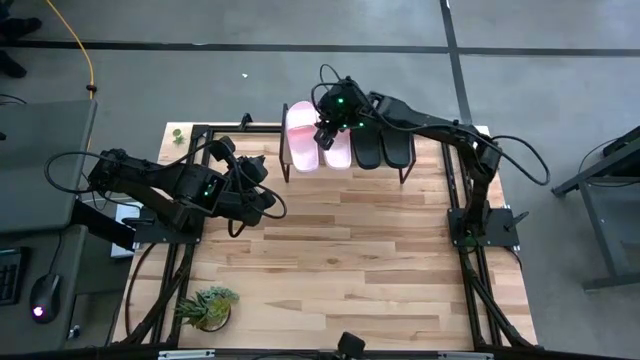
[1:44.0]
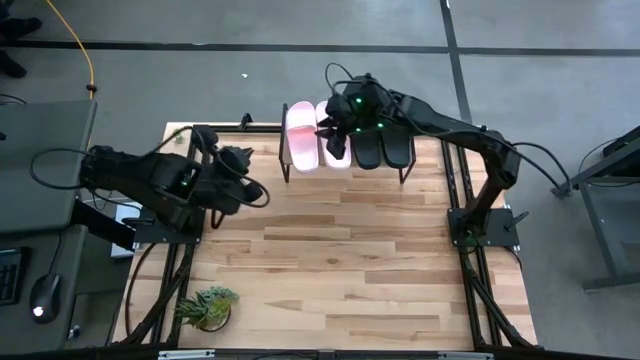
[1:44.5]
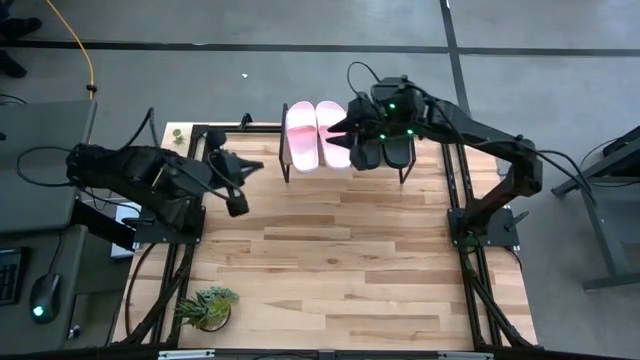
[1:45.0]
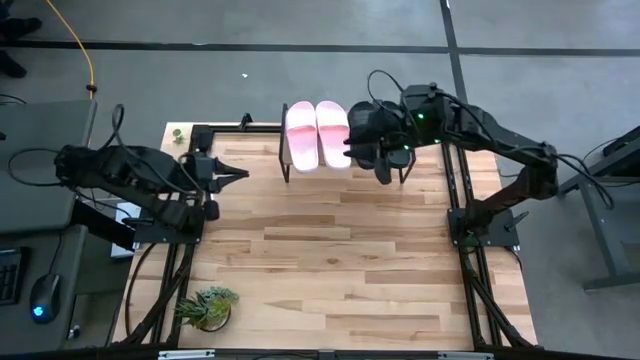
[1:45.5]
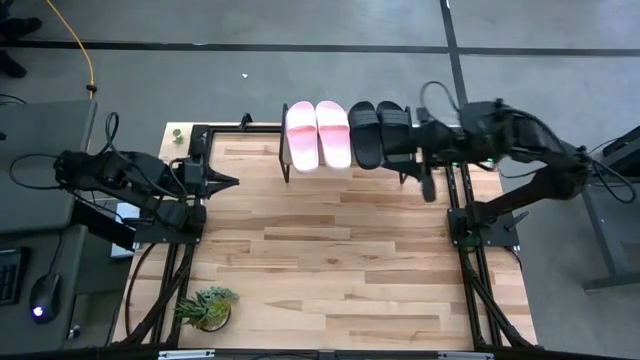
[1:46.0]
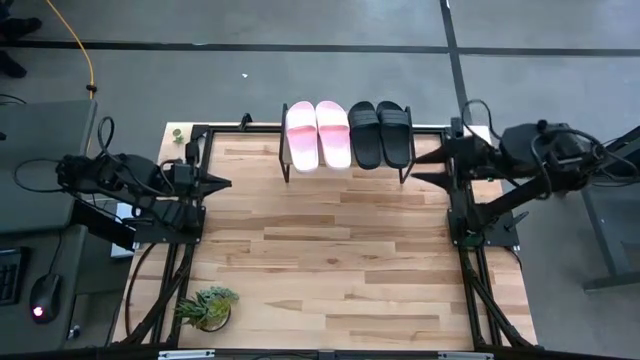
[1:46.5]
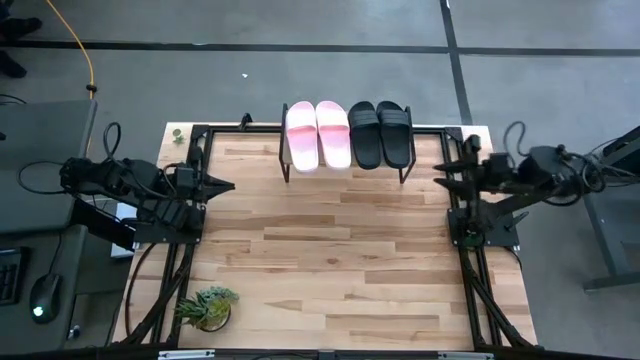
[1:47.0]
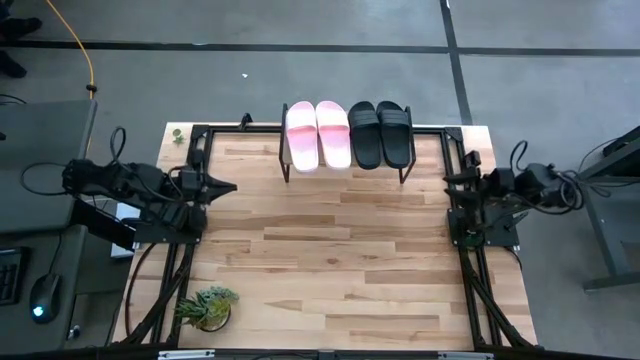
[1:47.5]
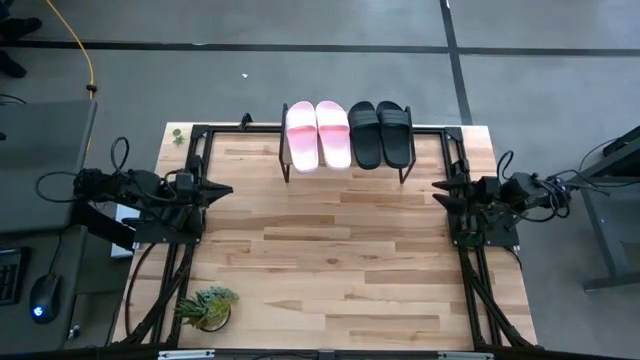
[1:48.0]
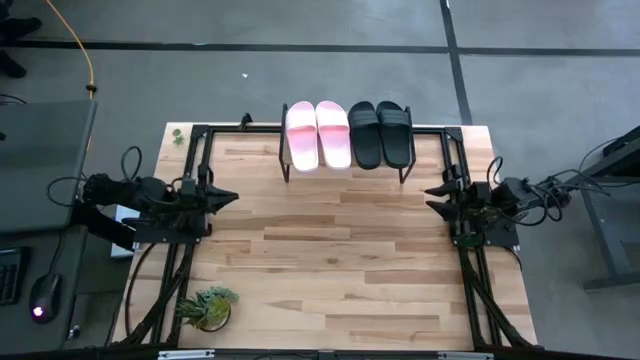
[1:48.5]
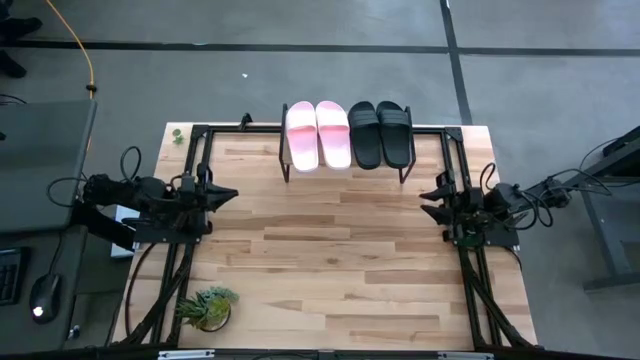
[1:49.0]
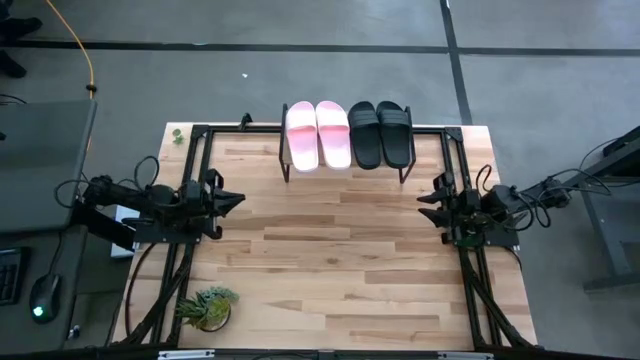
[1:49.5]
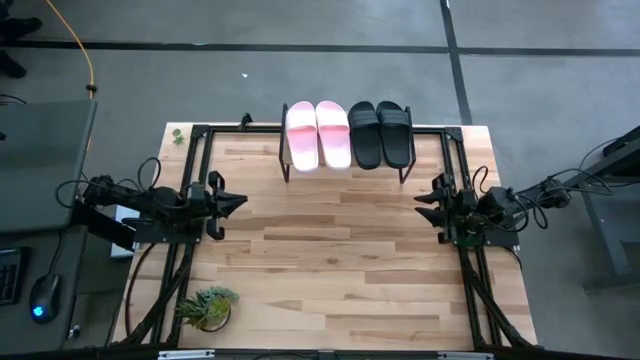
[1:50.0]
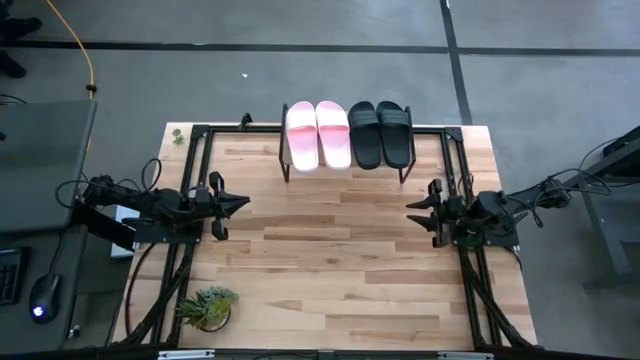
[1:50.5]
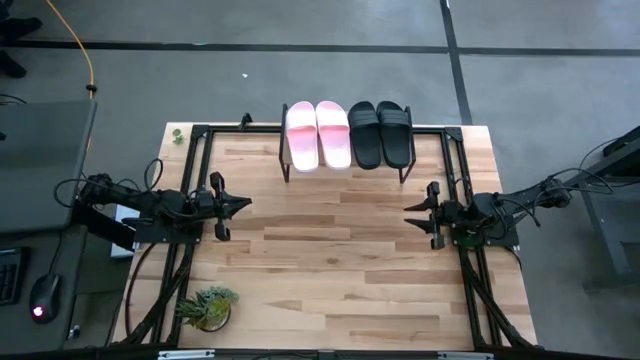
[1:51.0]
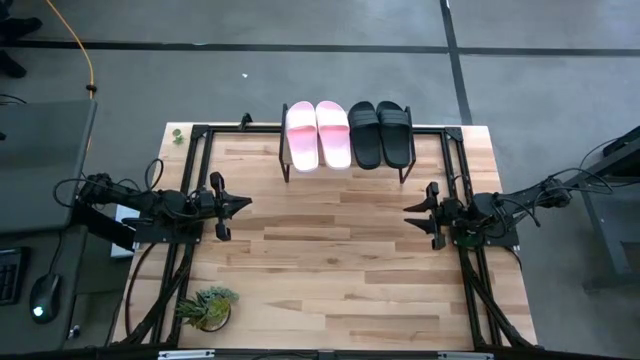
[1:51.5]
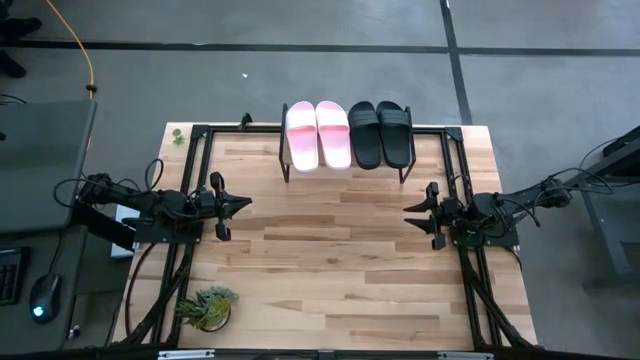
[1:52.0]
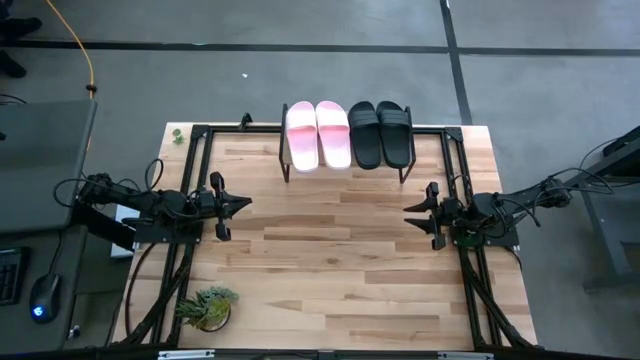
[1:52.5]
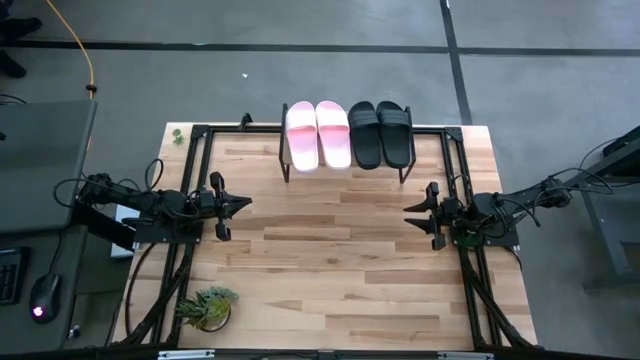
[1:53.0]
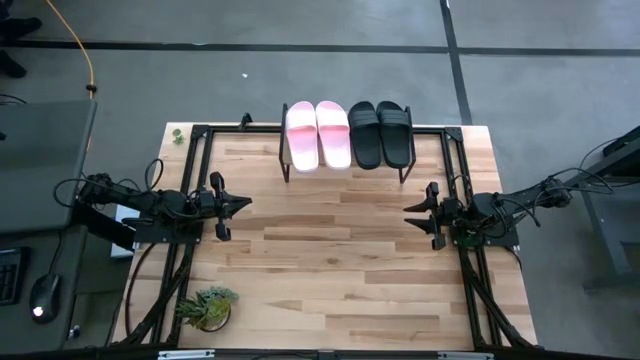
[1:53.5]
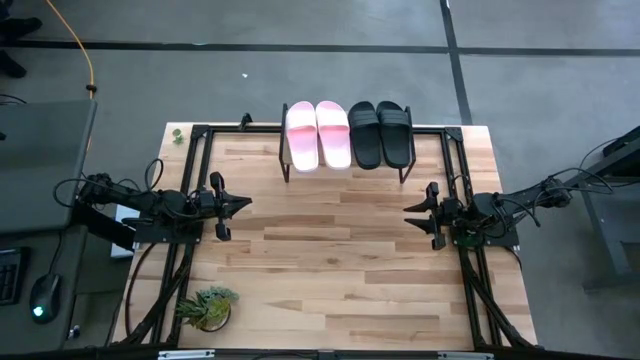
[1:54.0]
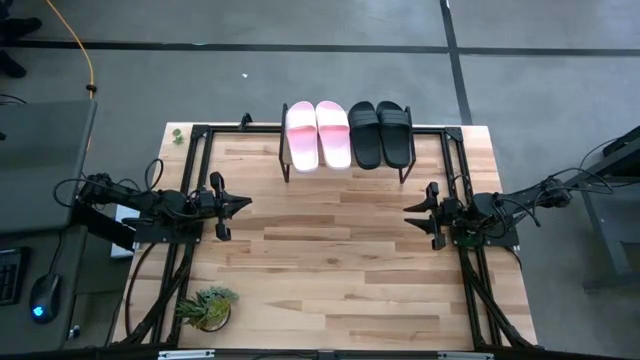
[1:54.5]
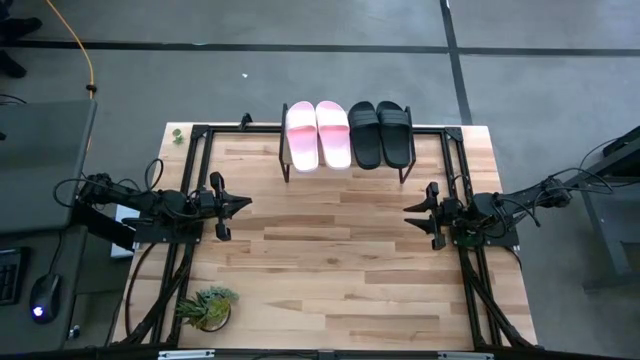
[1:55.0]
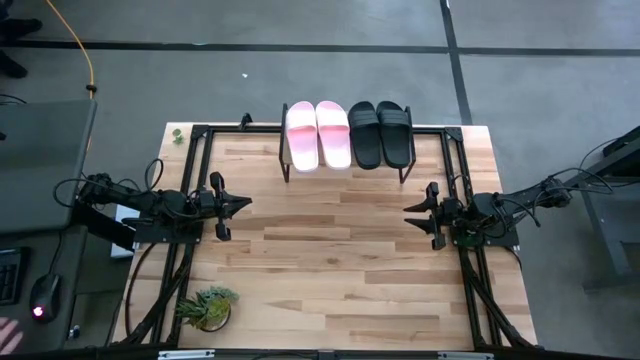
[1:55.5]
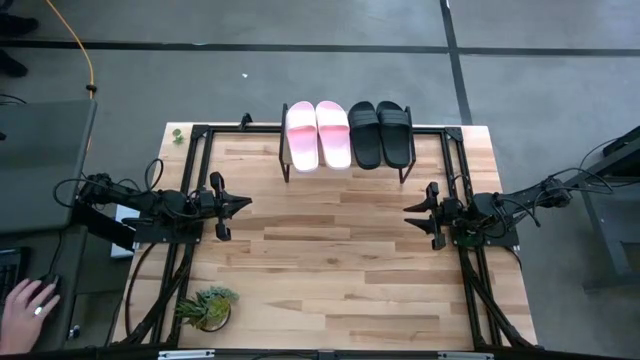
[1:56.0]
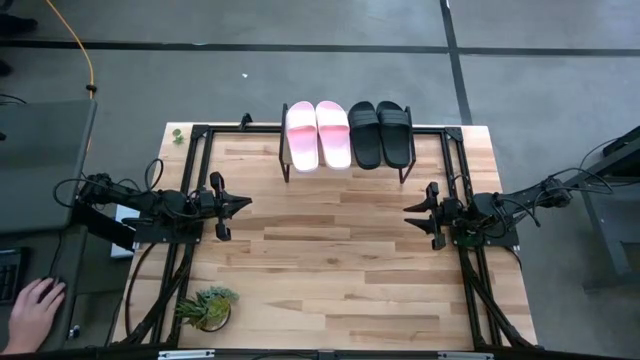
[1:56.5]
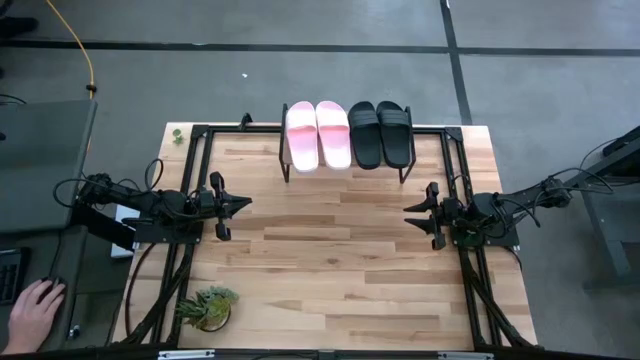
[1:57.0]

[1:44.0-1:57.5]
Task: Pick and place slides into the shelf
Return to Home Position

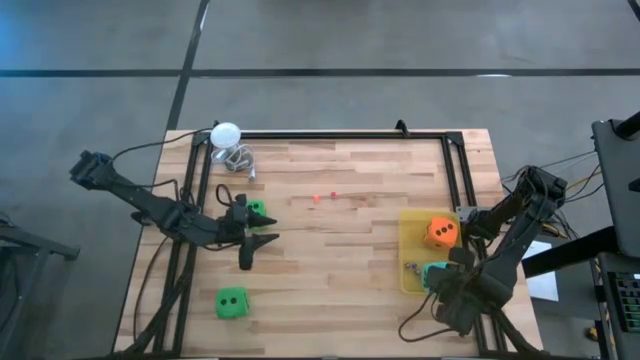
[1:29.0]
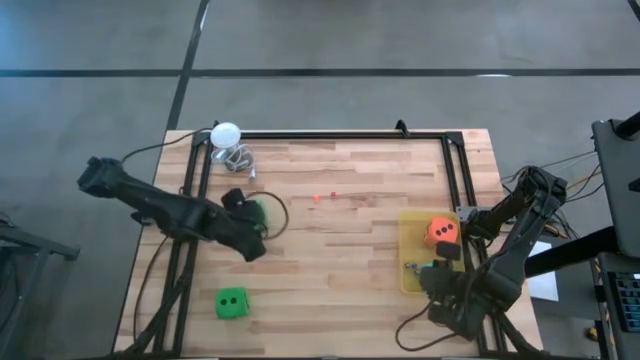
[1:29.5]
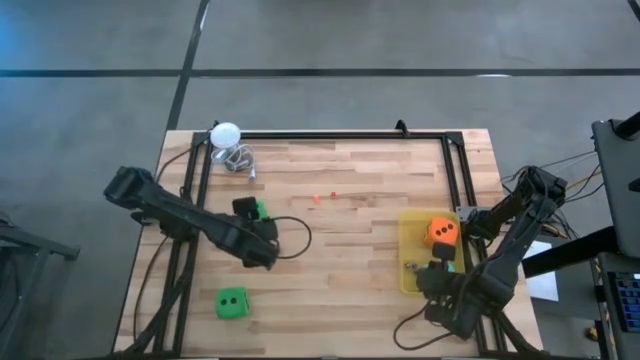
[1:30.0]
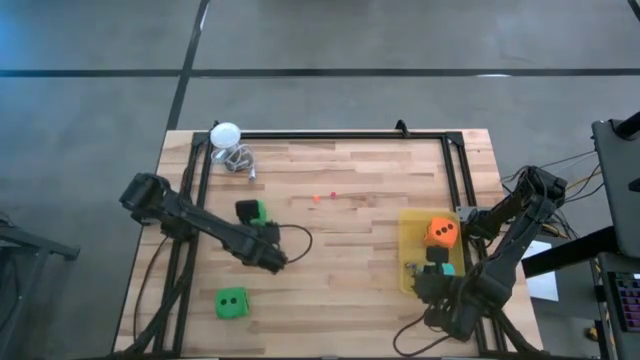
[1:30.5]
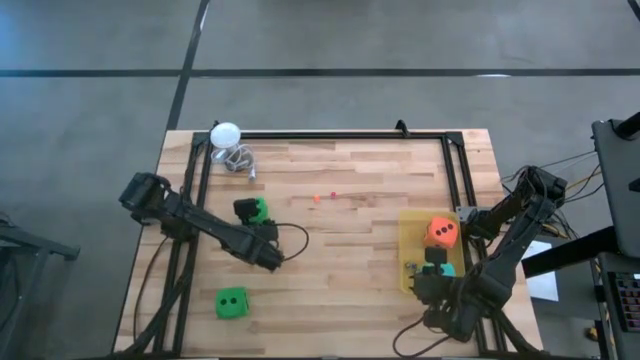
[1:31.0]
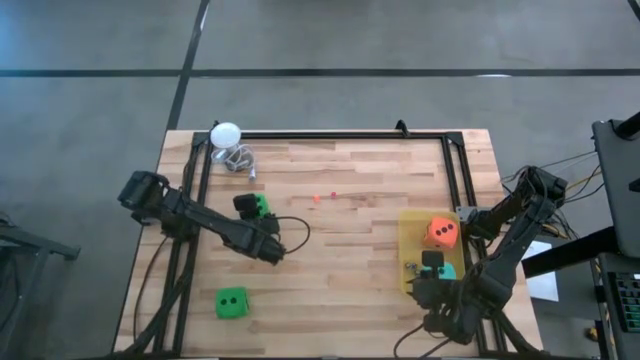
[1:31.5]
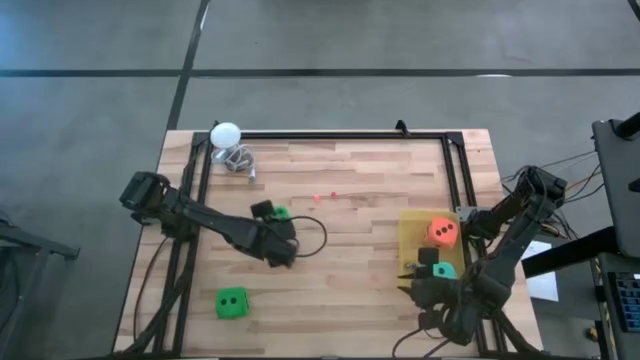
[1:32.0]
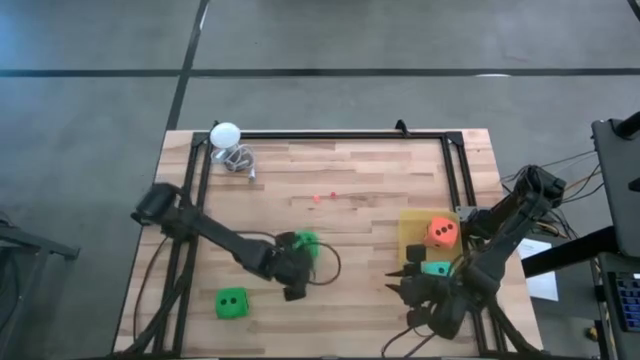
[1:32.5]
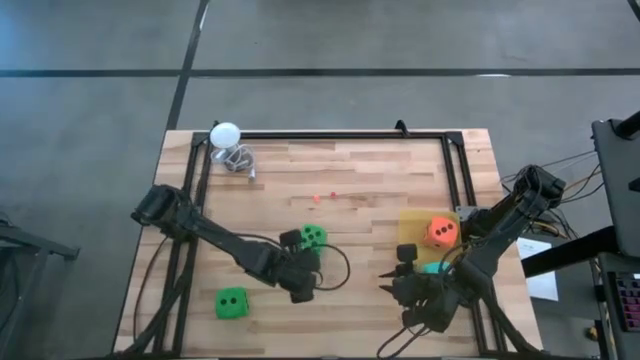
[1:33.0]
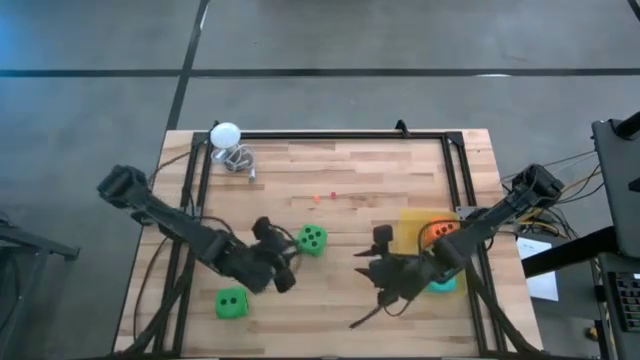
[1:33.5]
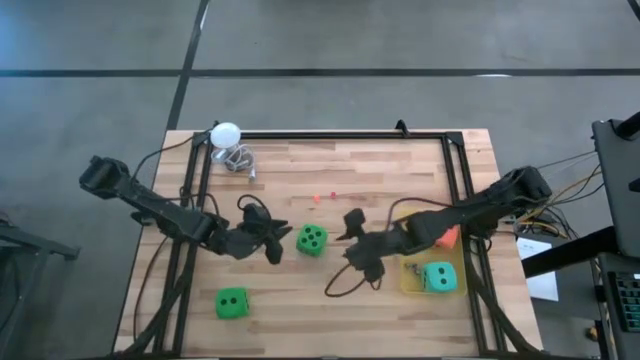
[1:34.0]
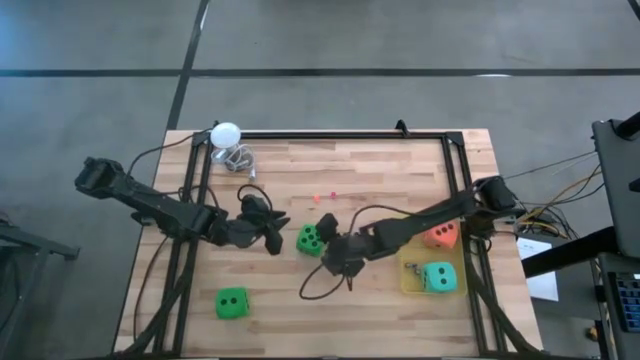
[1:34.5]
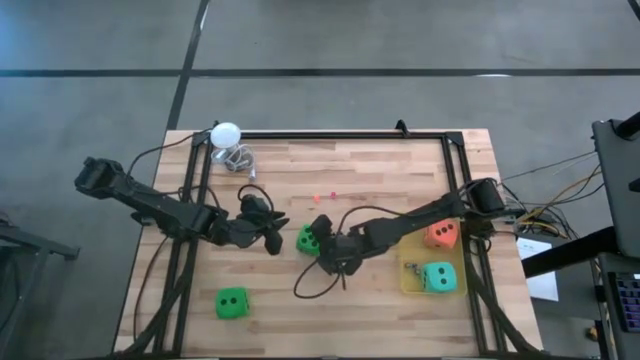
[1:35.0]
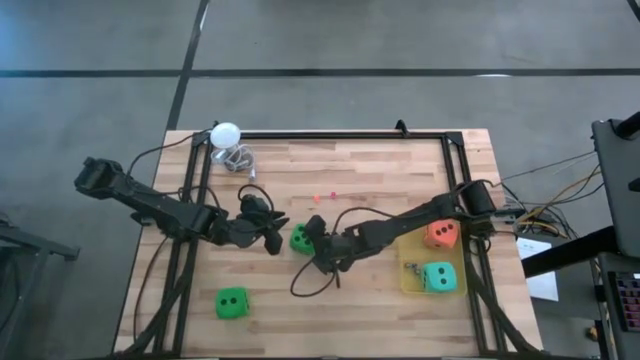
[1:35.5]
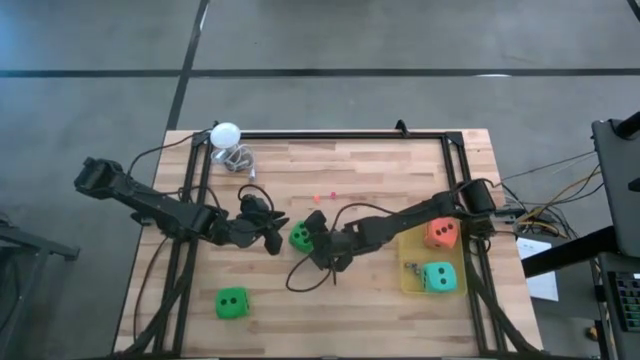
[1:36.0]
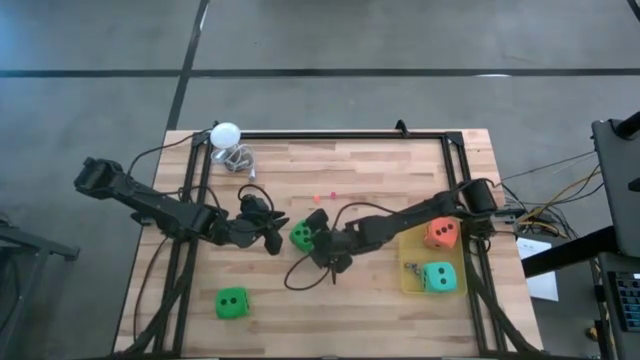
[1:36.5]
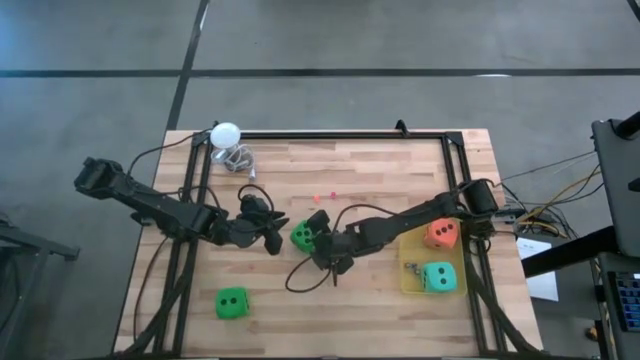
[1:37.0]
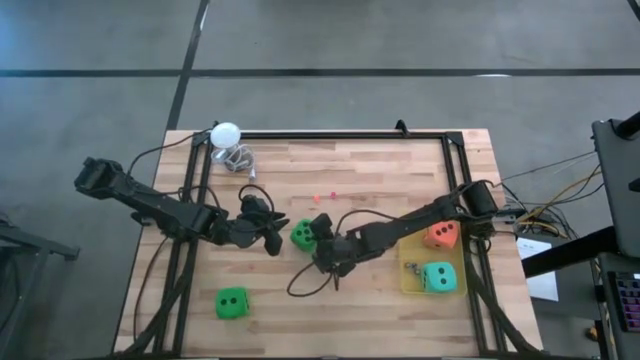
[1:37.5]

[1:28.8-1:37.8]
Task: Pick & Place Dice
Put the top large green dice into the yellow bin
